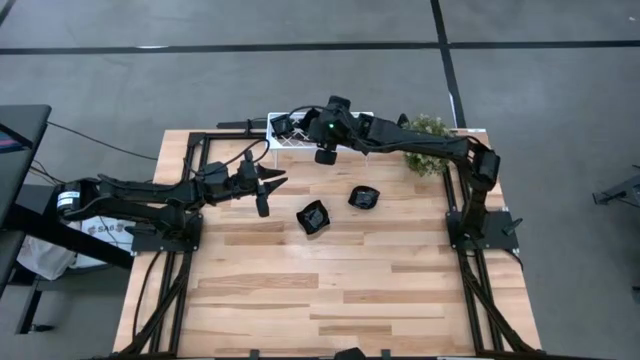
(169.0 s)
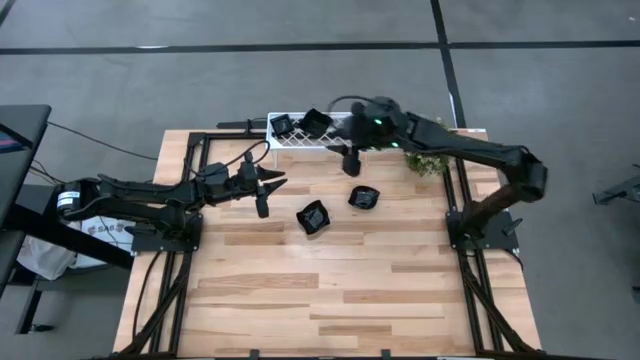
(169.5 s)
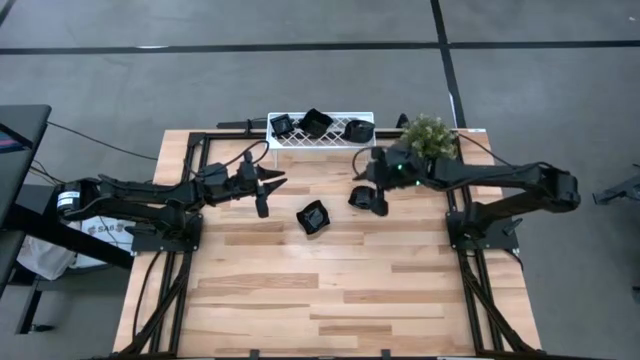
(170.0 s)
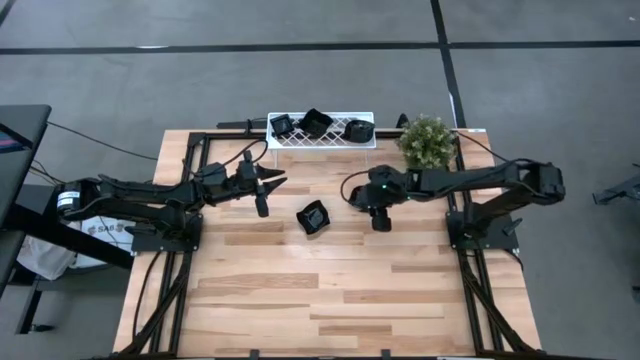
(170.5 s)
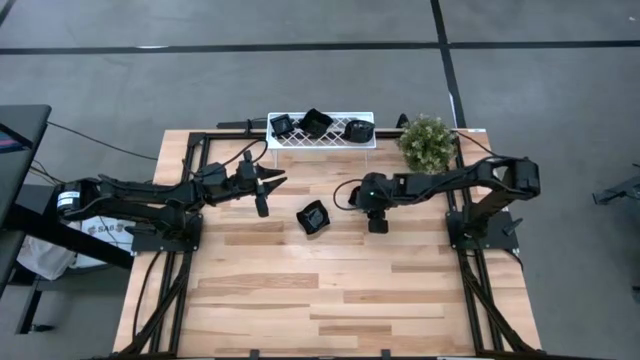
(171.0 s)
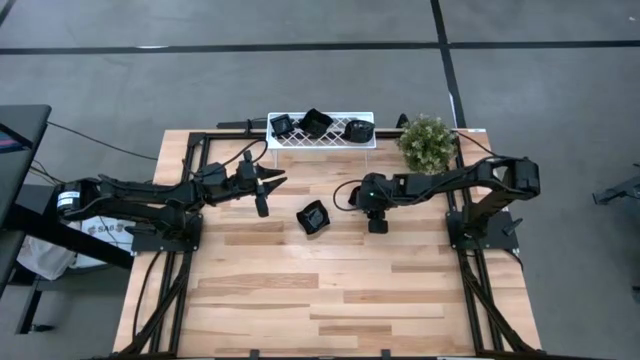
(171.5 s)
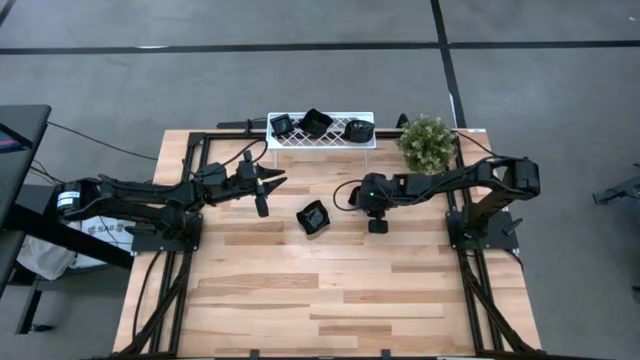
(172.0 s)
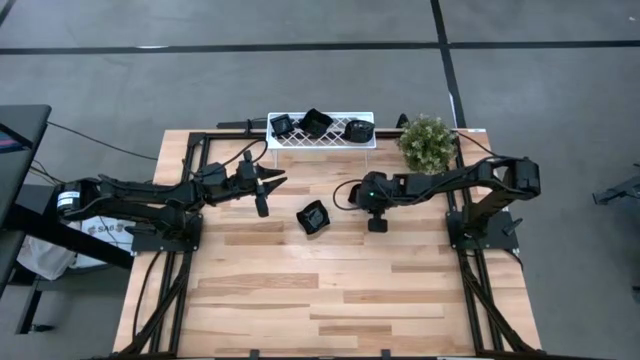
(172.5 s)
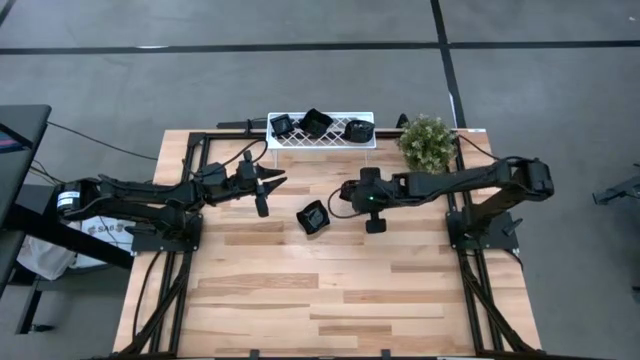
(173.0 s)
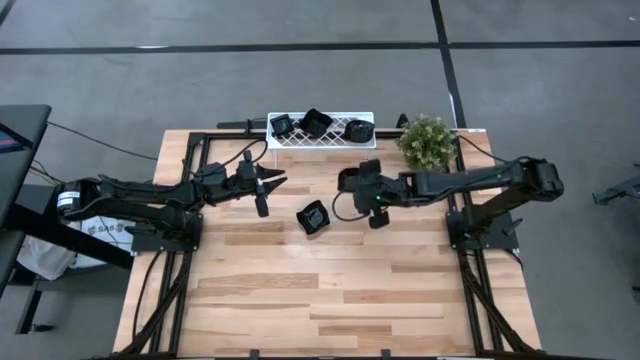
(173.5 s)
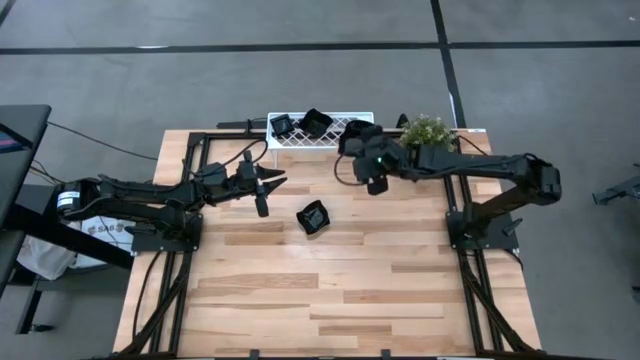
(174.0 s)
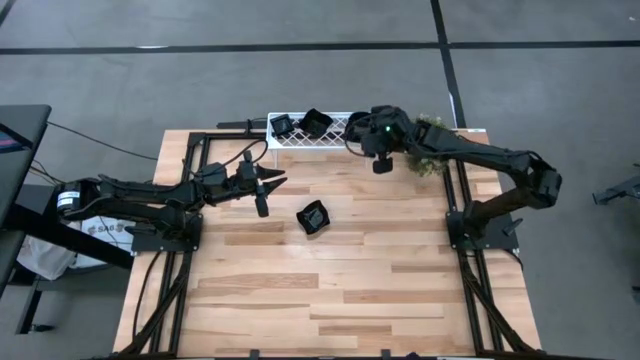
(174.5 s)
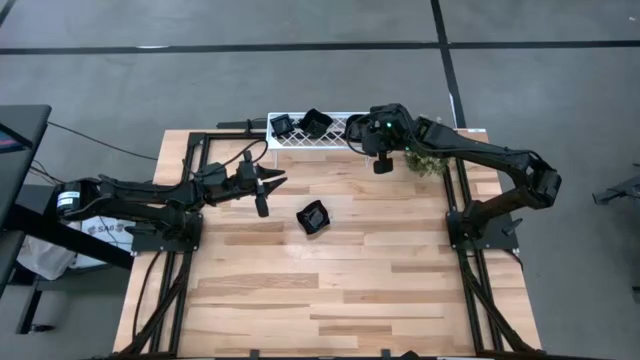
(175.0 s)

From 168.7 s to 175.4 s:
Task: Pick & Place Mini shaped plates
Stack the black leaf shaped plate on top of the black leaf shaped plate on the shelf

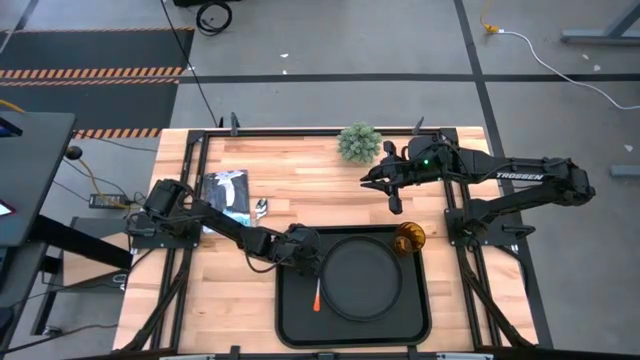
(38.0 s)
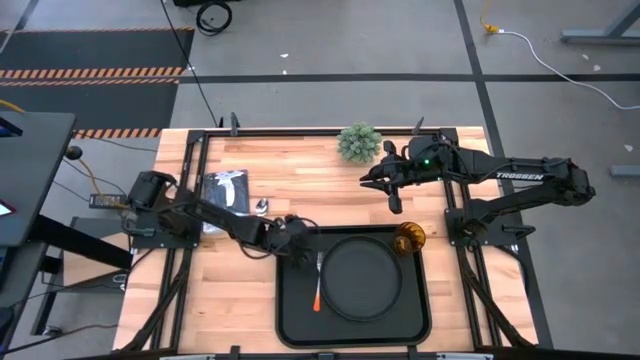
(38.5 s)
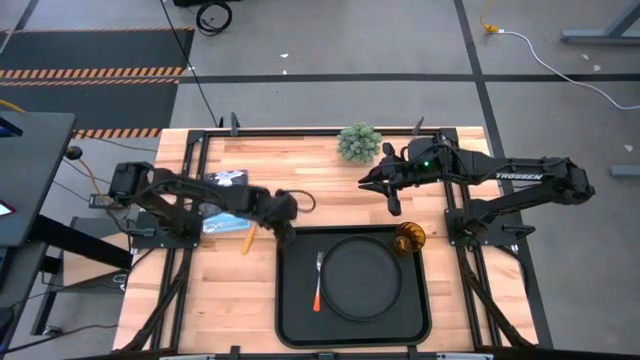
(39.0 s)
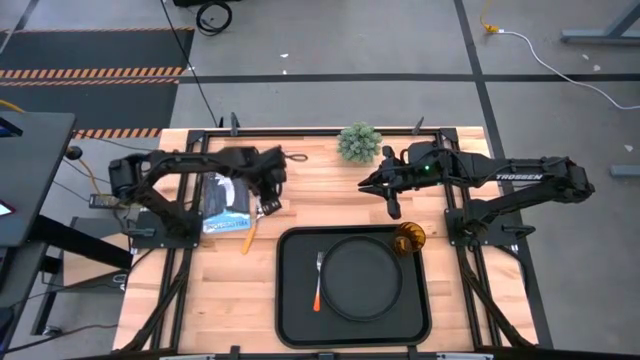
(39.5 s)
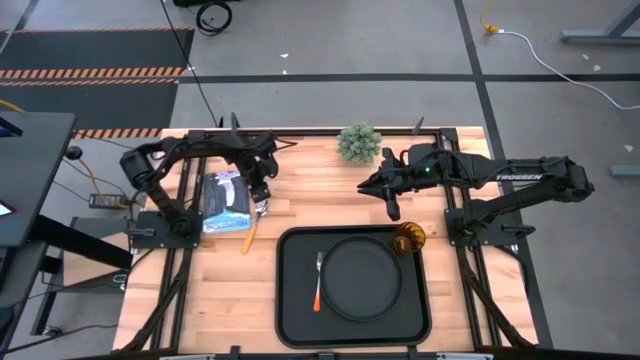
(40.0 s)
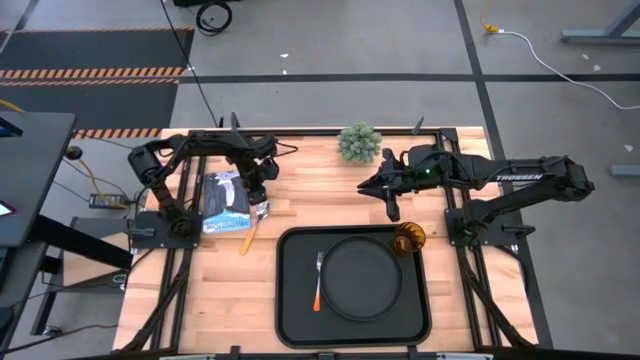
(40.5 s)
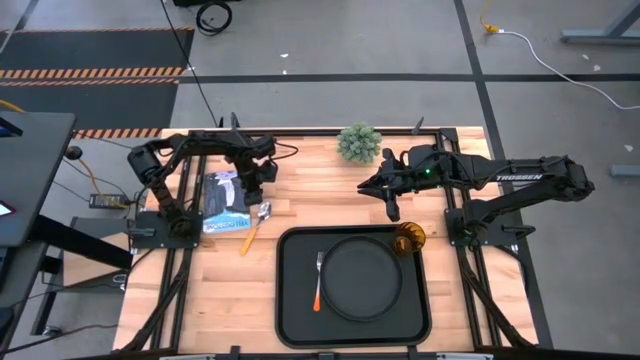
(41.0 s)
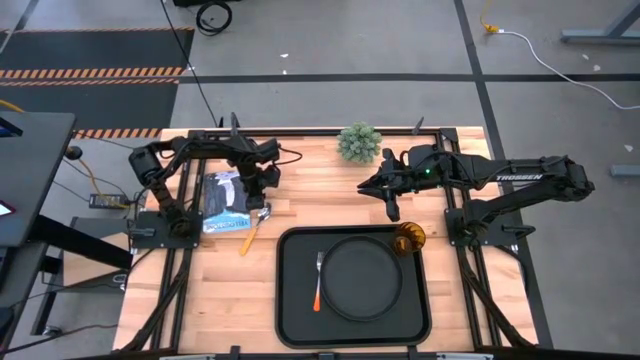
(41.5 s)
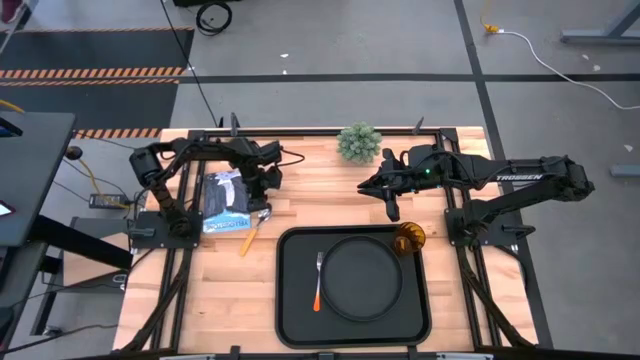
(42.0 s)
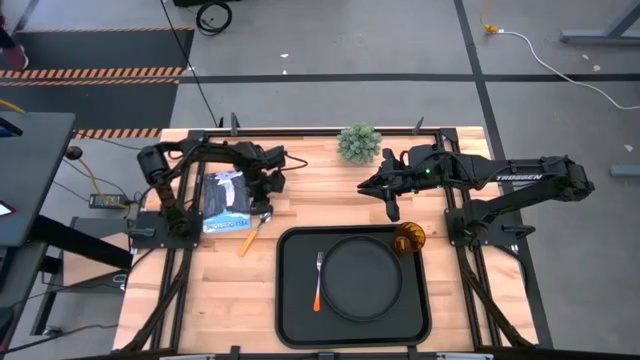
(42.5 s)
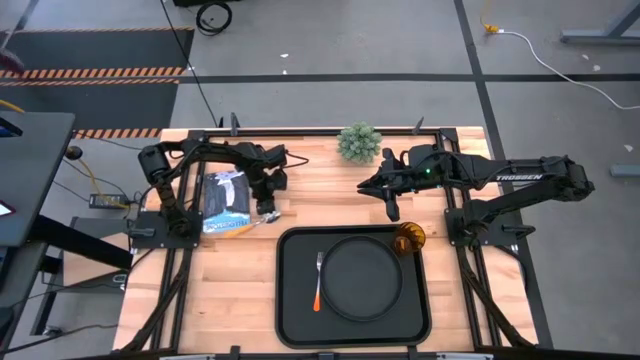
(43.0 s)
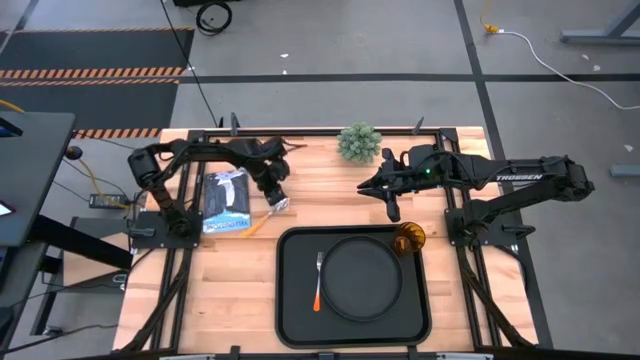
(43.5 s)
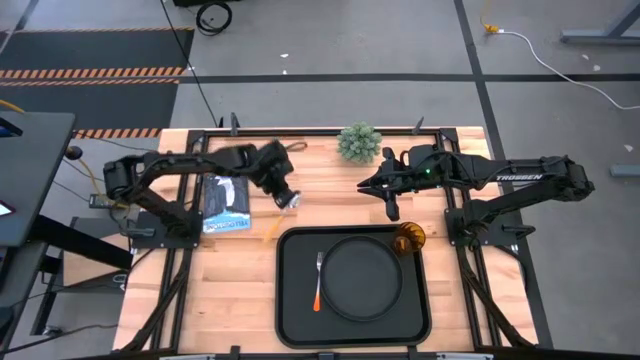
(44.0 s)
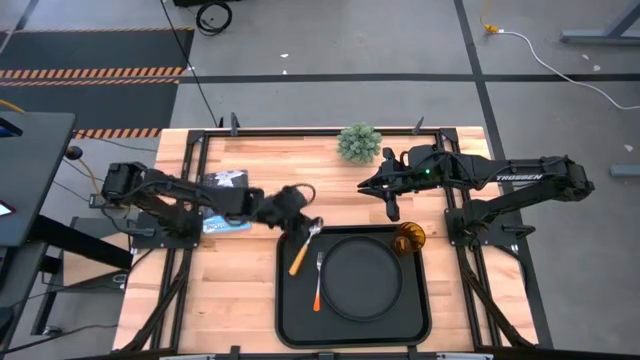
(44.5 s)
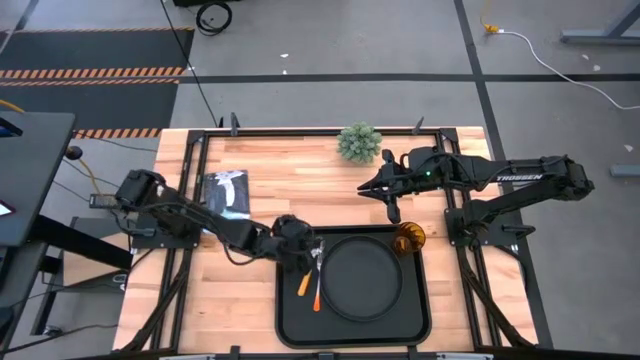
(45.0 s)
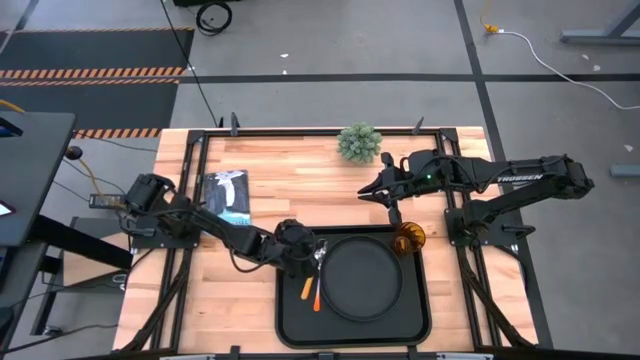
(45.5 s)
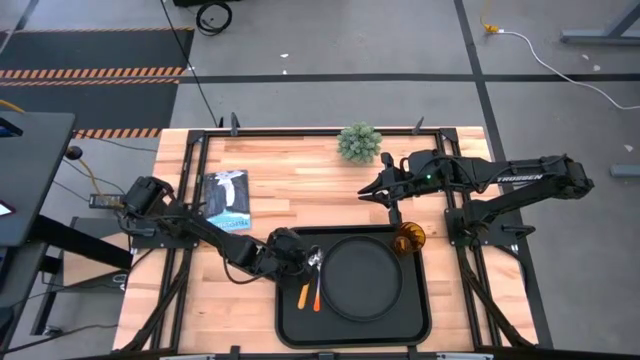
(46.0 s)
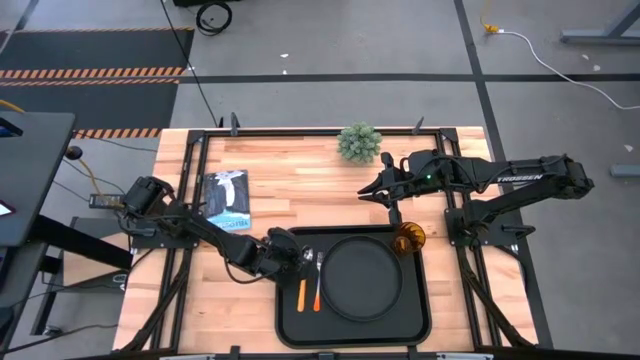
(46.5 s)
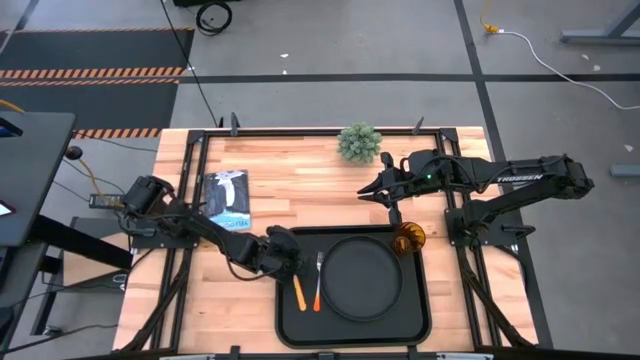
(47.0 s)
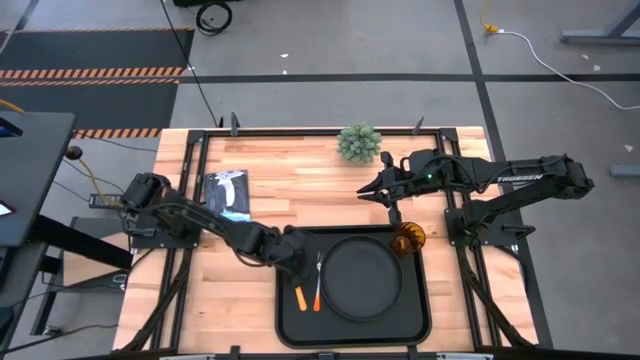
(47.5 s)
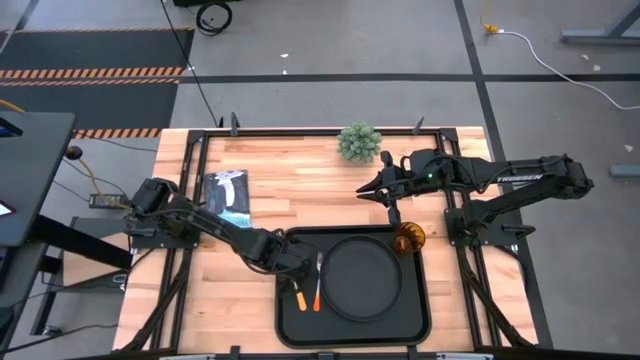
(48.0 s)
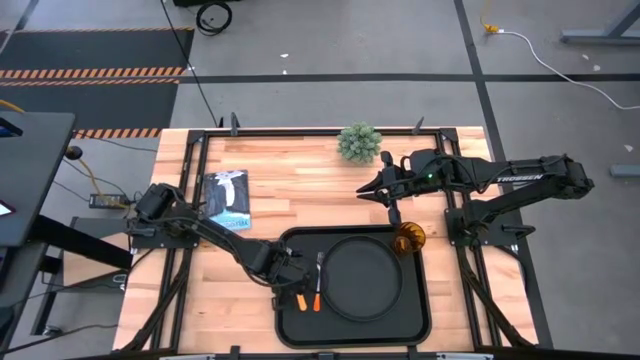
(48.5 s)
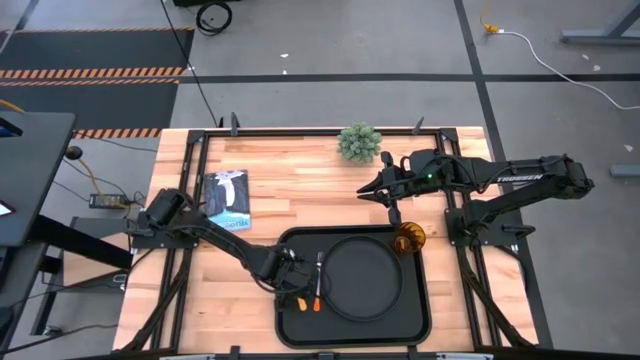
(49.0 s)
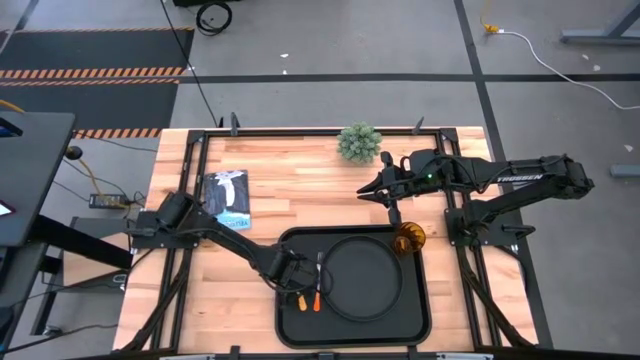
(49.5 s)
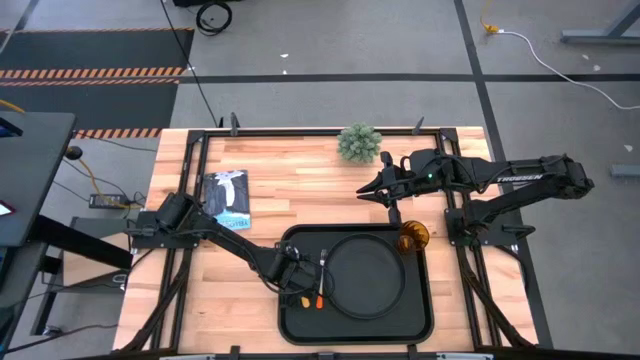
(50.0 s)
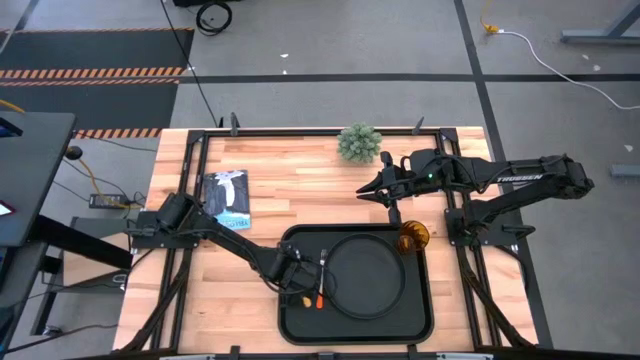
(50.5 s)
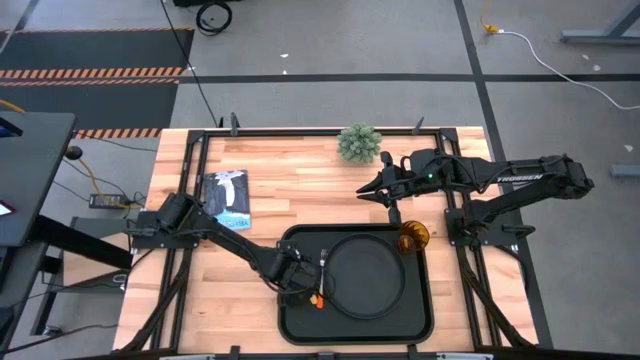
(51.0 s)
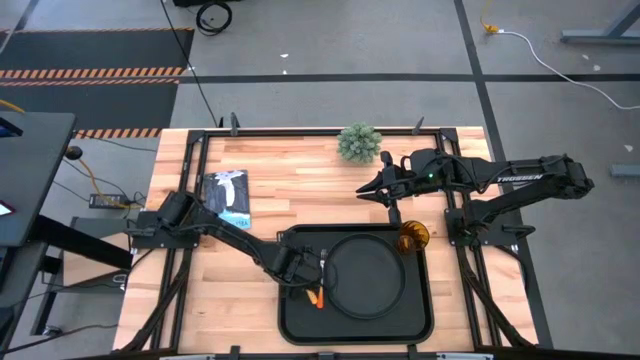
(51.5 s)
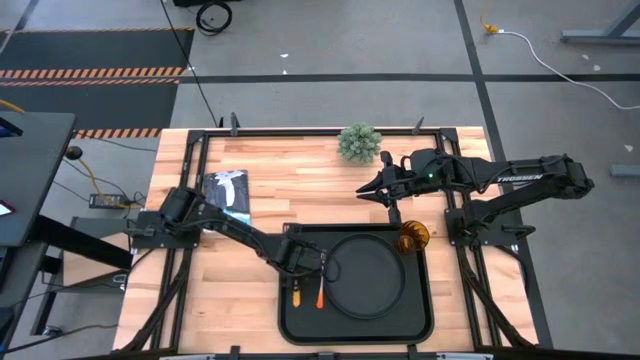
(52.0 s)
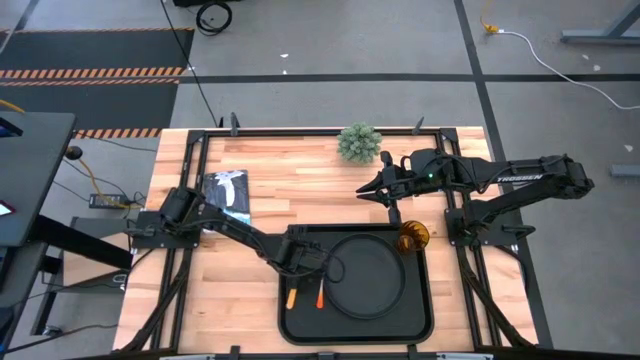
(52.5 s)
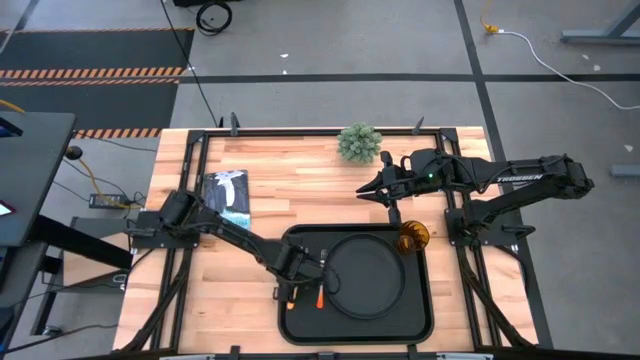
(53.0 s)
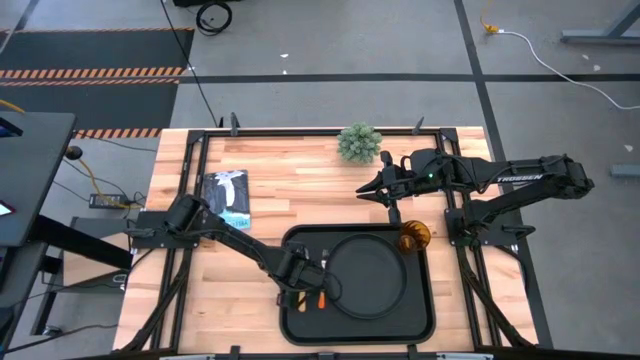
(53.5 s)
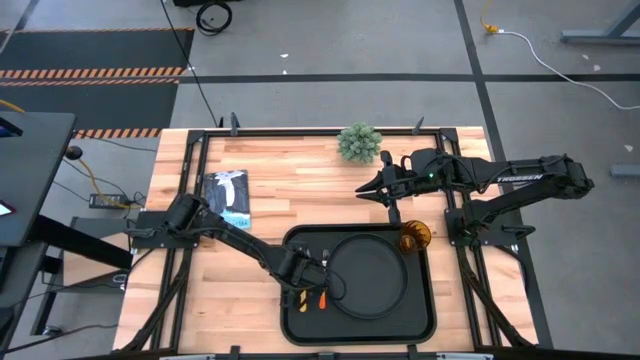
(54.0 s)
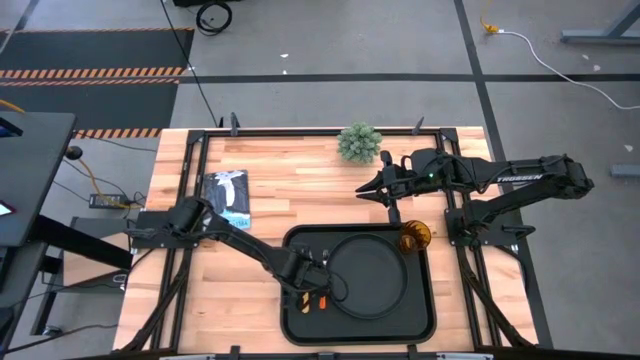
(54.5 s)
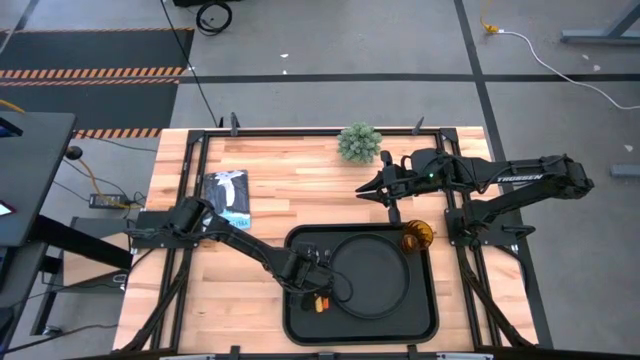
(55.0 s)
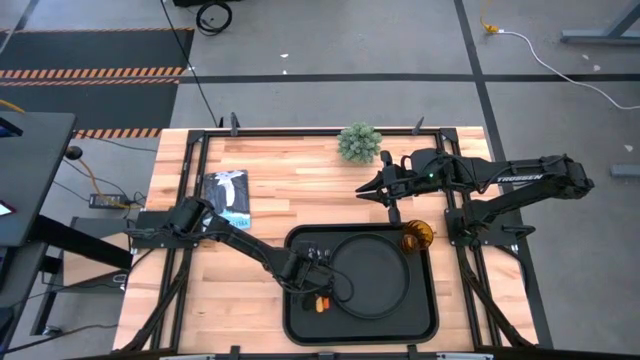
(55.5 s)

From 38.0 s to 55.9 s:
Task: Pick and place plate/cup/fork/spoon on tray
Put the yellow spoon to the left side of the orange fork on the black serving tray
